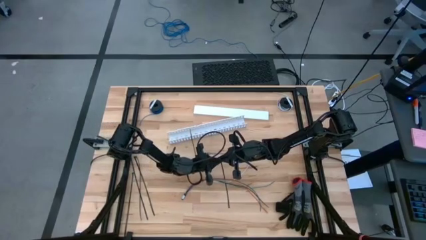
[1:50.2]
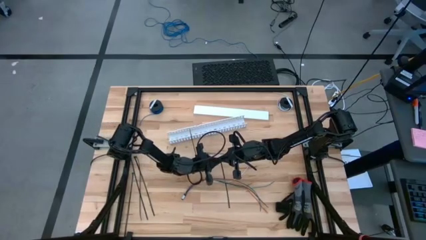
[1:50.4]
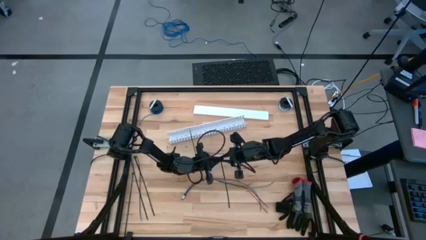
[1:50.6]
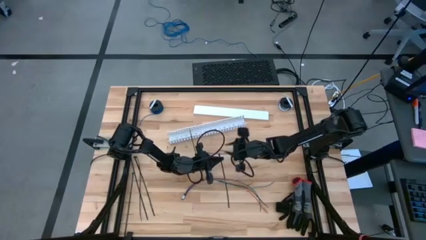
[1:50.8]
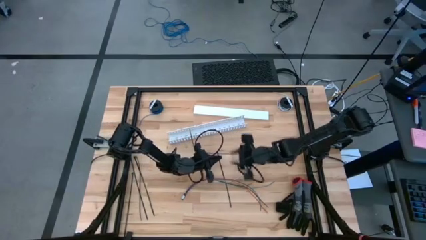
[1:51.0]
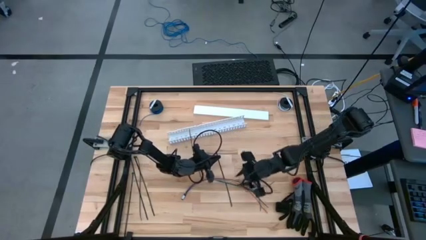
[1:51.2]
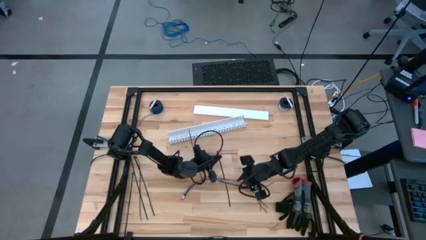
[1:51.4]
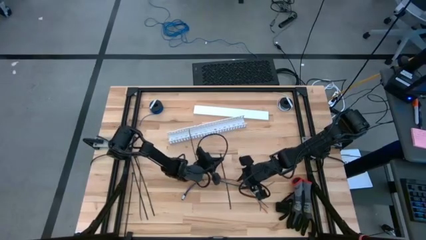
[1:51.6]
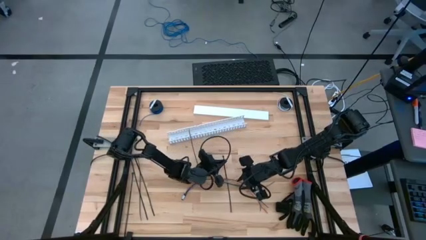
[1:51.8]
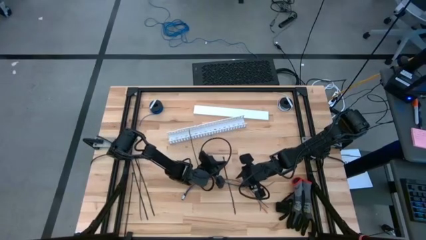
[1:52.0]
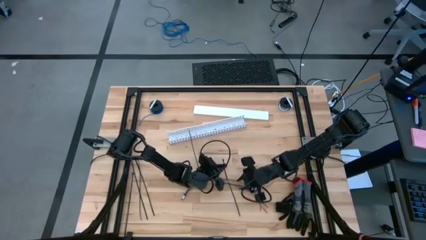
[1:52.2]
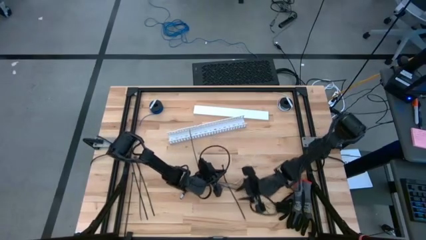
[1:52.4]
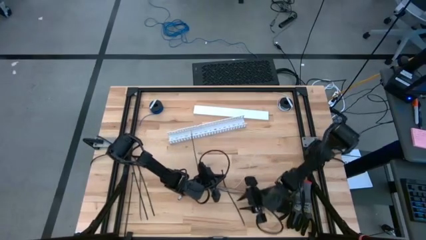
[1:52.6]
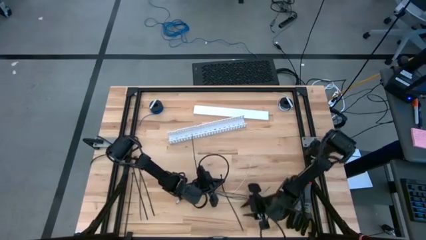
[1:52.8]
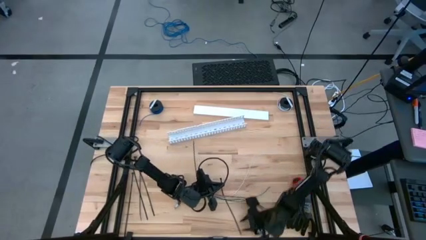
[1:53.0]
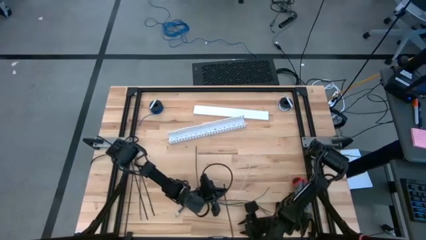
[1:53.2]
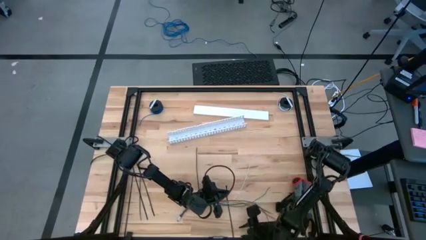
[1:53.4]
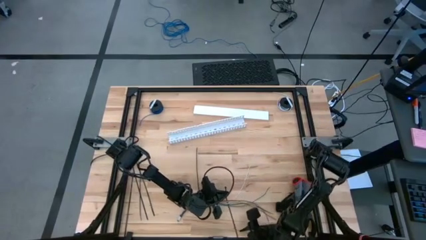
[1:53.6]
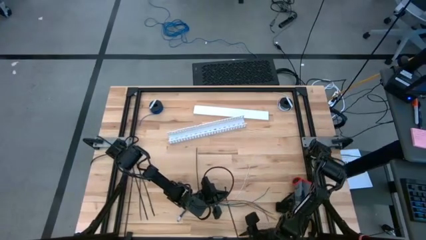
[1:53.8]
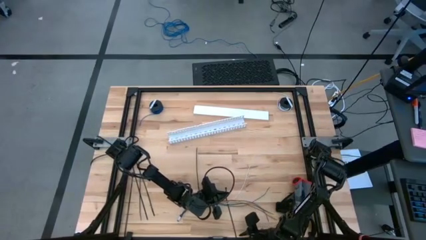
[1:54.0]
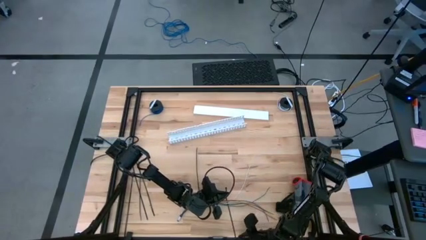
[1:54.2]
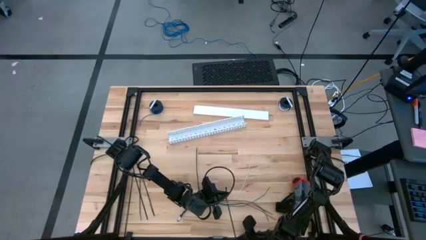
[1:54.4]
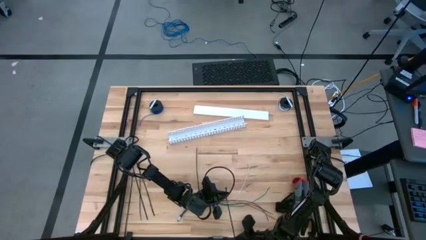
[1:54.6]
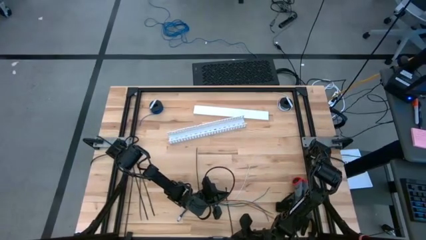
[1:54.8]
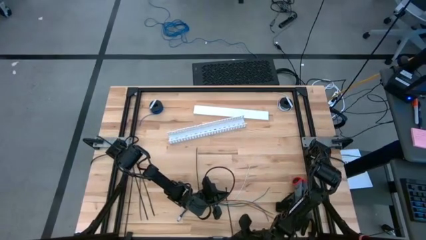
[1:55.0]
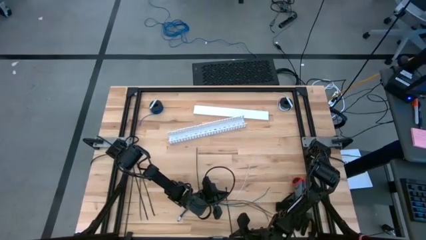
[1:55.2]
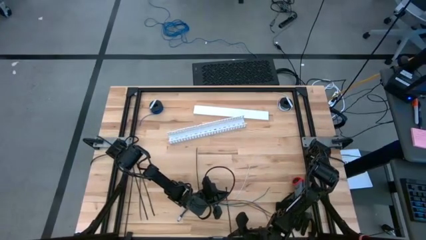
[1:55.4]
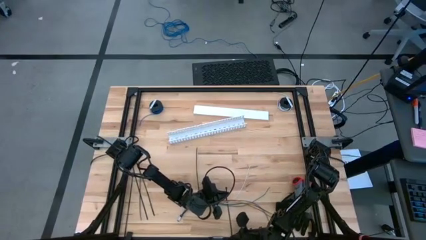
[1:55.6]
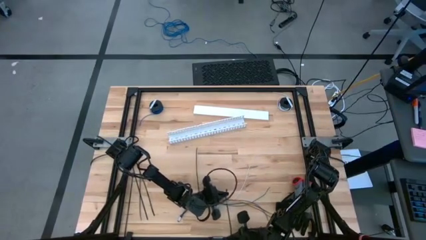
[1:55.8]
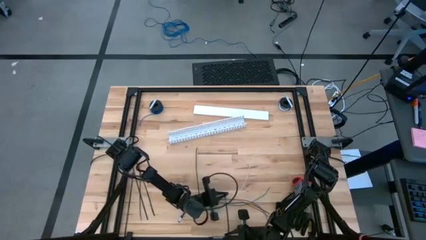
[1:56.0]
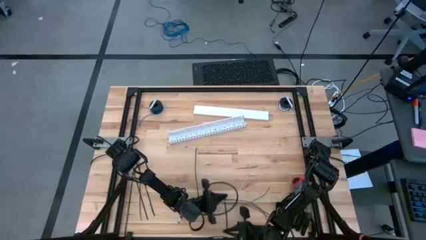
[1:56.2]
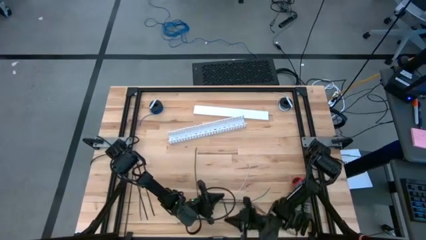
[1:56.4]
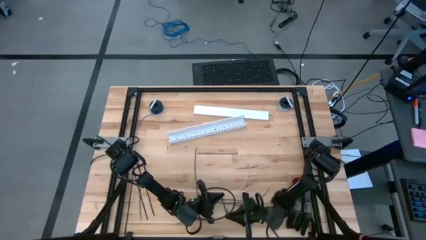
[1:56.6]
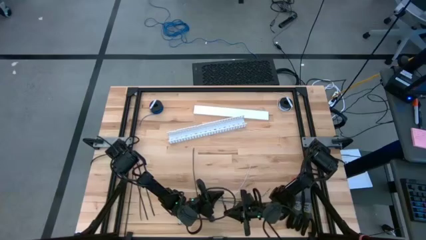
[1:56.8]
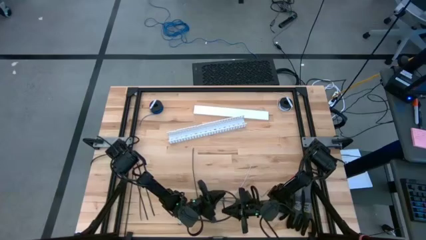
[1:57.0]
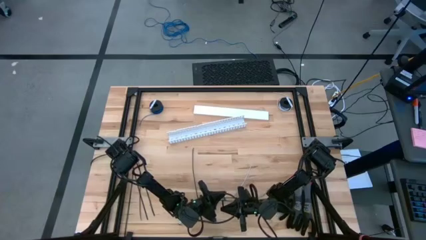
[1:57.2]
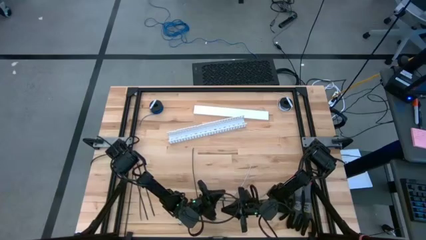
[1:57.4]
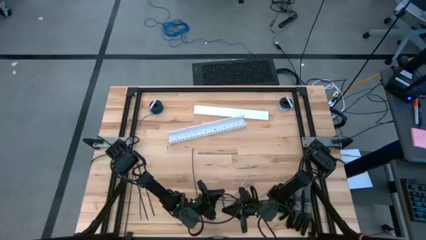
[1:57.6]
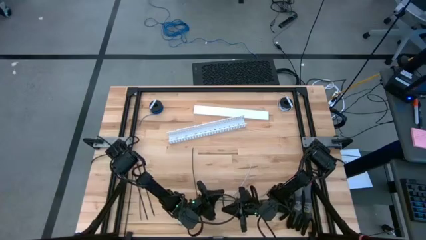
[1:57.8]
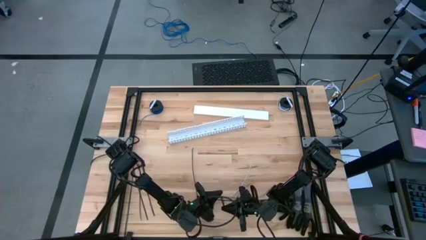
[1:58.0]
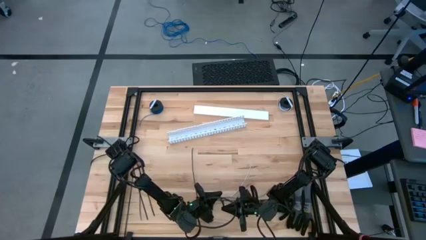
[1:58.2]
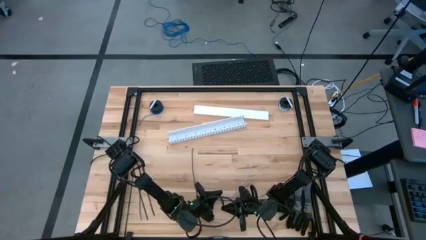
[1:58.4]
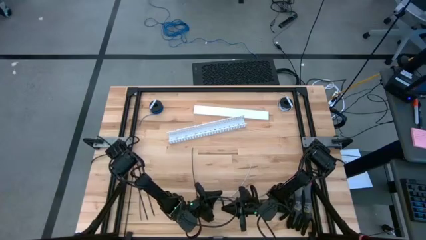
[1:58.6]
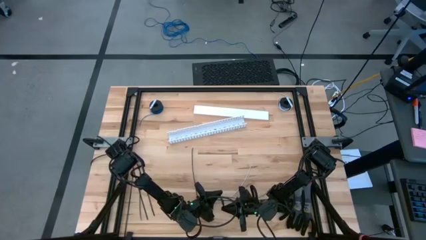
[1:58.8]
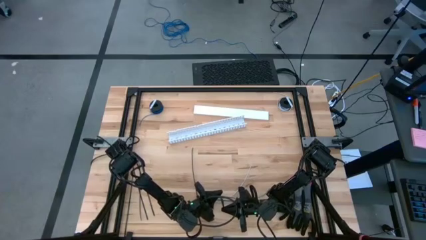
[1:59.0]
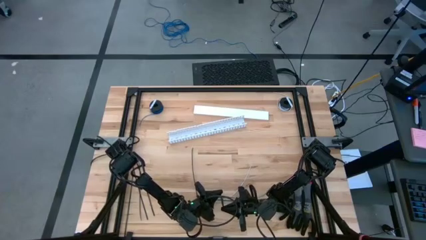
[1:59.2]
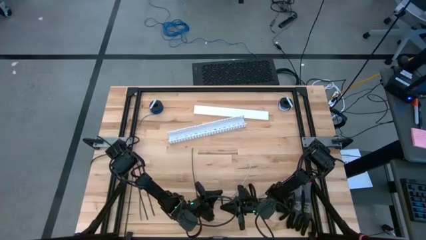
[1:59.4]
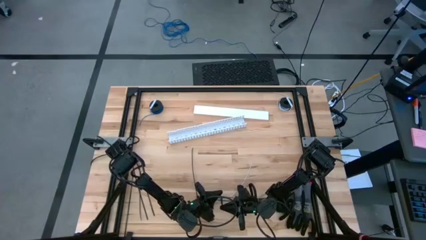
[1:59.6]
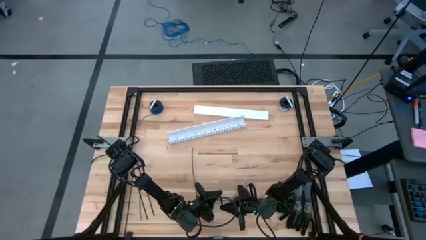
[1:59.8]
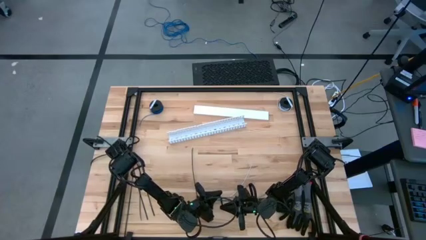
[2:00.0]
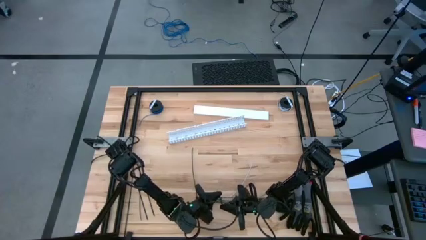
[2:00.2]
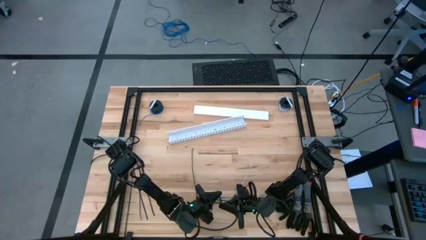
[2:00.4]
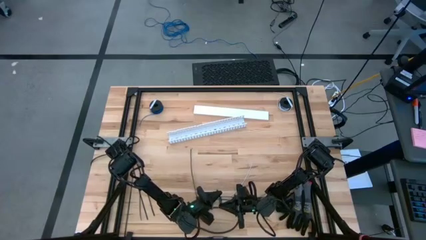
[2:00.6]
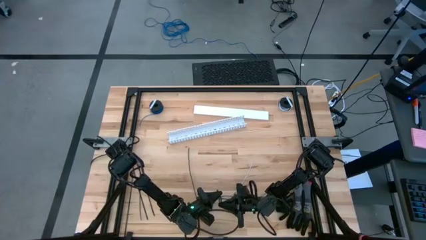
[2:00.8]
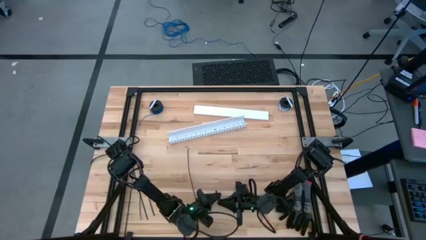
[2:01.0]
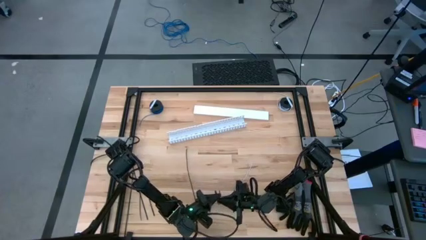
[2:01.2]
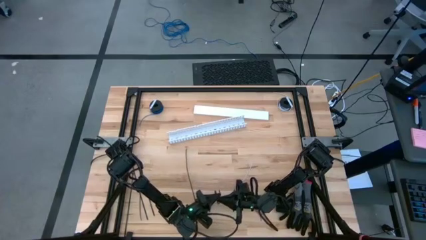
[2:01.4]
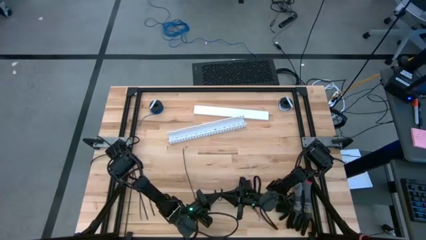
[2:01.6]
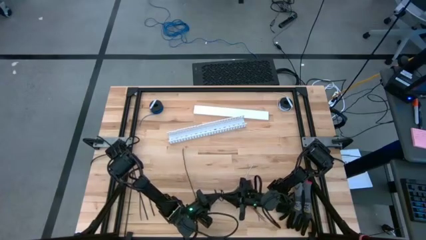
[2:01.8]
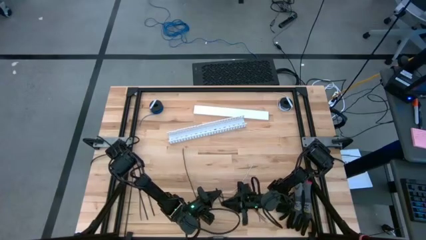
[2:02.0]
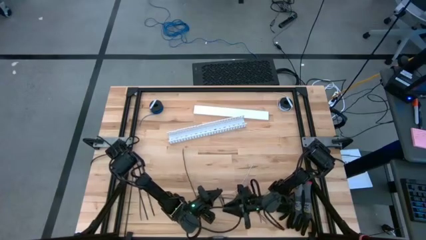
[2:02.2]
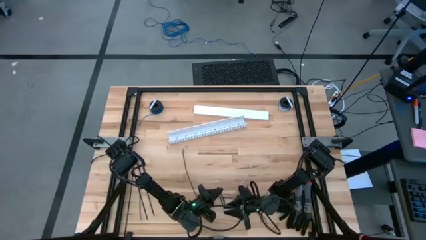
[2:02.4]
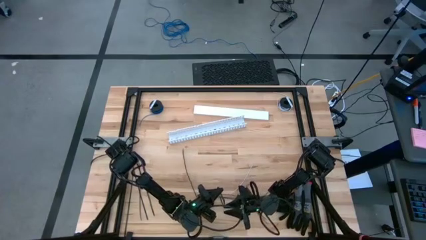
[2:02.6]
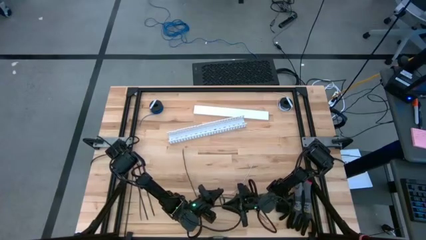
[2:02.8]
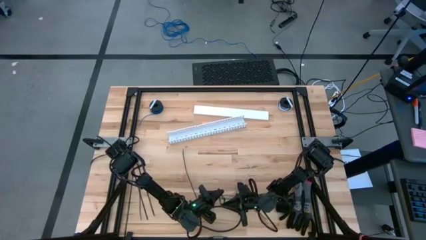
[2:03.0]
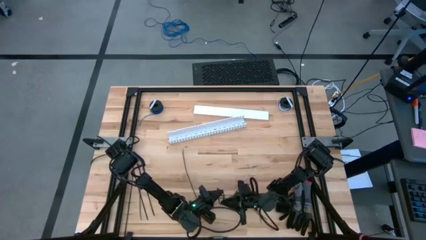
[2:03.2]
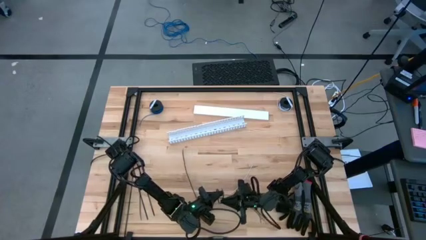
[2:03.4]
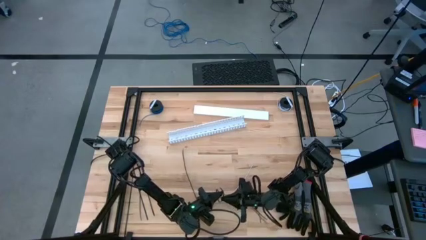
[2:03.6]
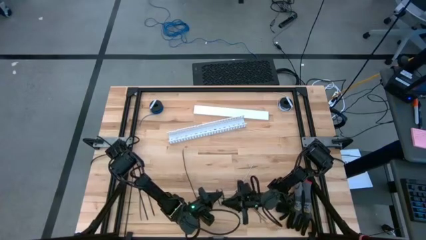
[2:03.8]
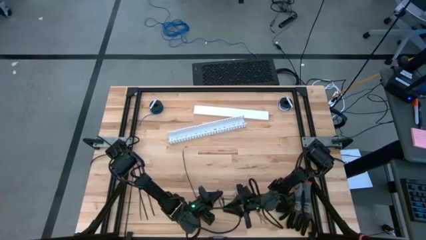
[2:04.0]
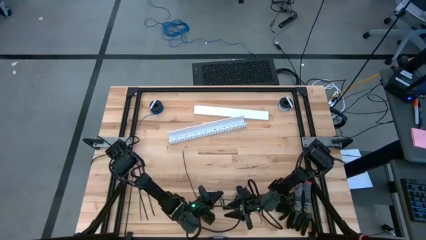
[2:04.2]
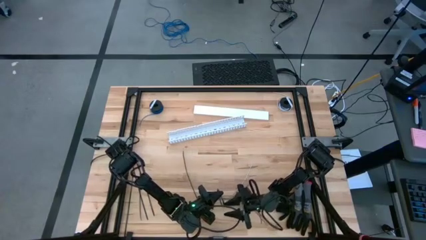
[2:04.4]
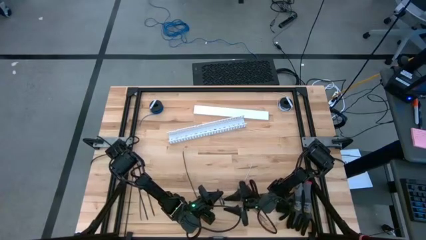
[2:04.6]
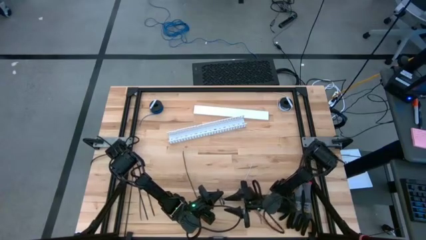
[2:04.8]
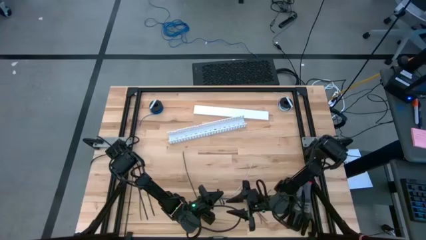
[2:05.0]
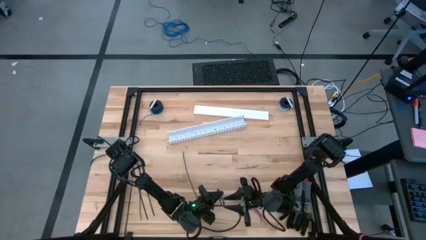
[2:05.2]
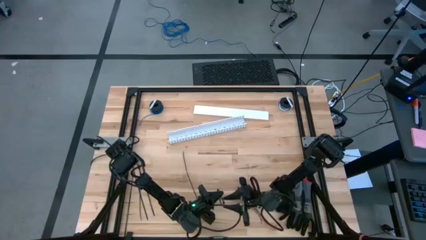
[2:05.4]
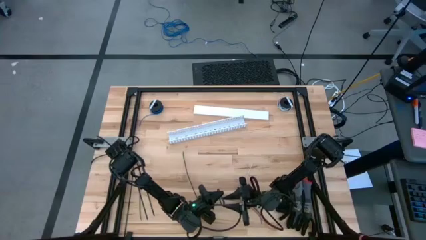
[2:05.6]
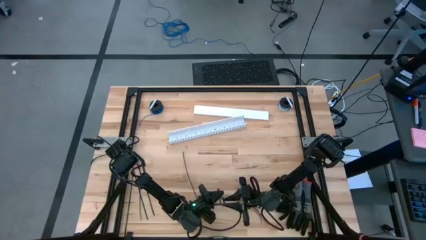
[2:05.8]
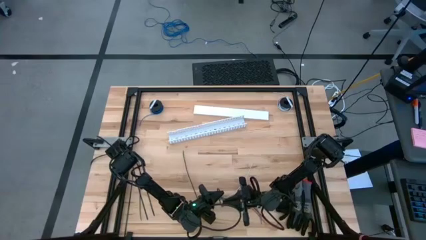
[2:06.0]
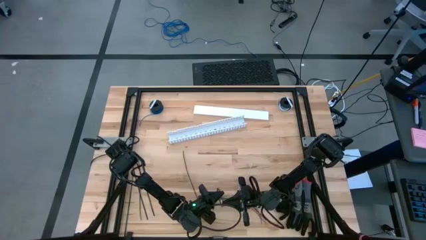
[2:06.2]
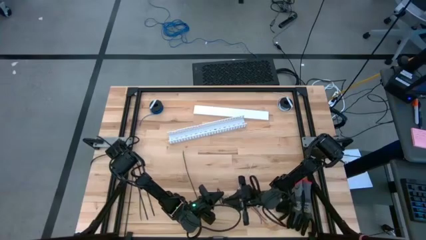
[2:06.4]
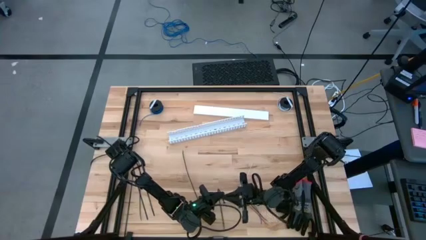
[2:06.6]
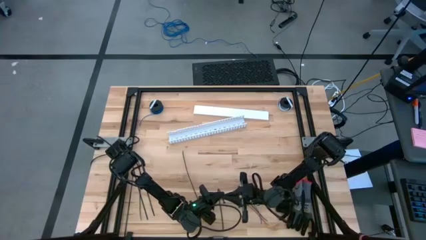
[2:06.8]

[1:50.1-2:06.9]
Task: Ziptie cables
Wrap the colored loose cables with the black zip tie
